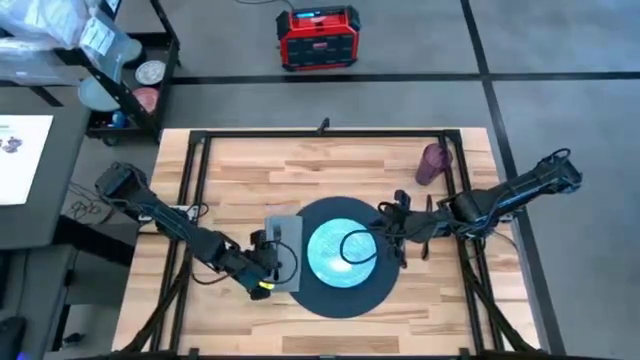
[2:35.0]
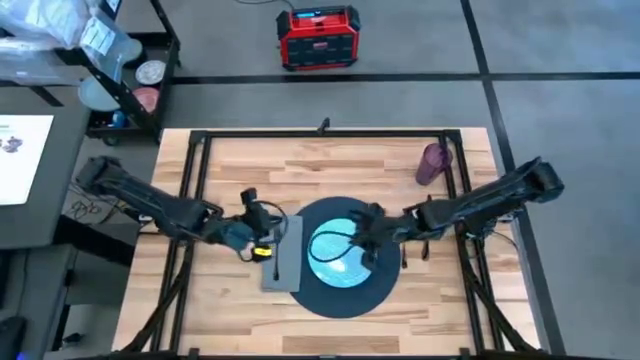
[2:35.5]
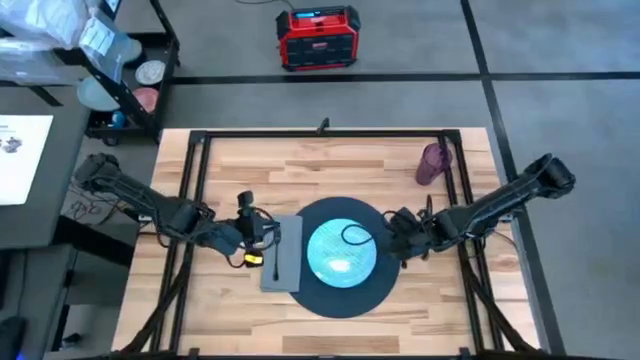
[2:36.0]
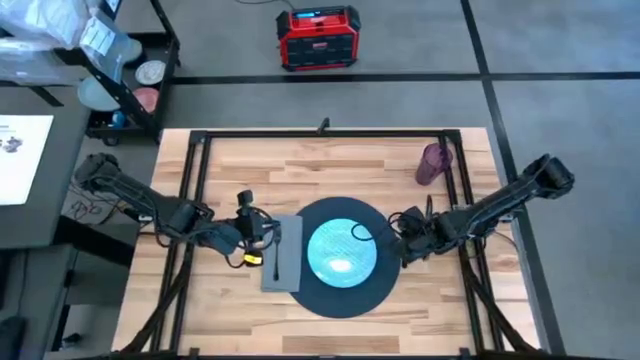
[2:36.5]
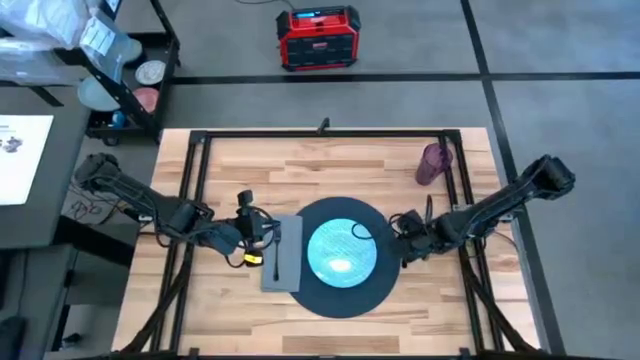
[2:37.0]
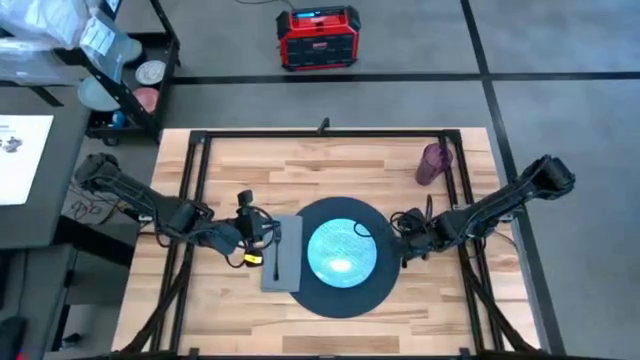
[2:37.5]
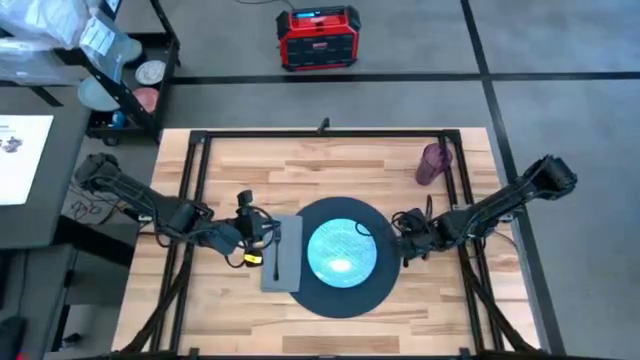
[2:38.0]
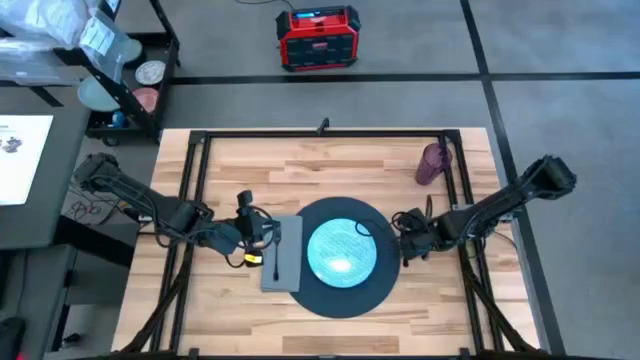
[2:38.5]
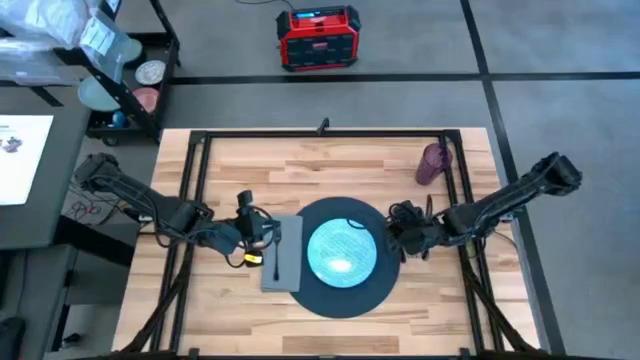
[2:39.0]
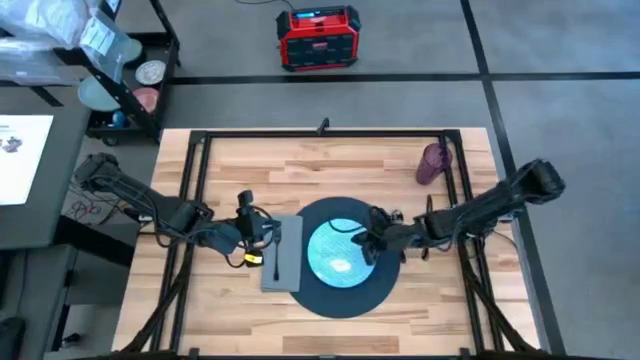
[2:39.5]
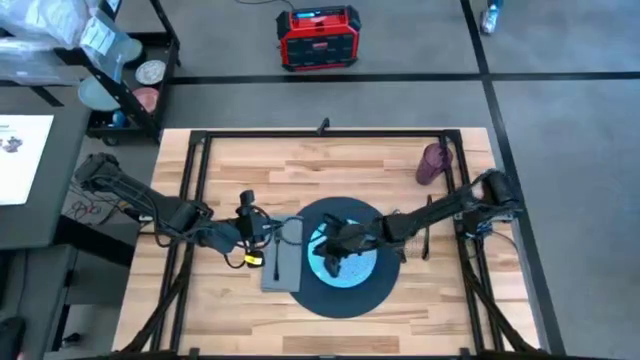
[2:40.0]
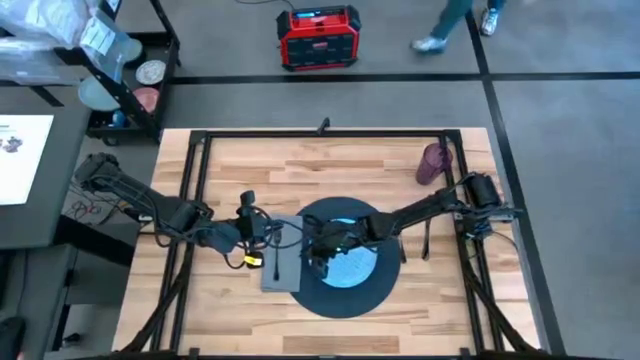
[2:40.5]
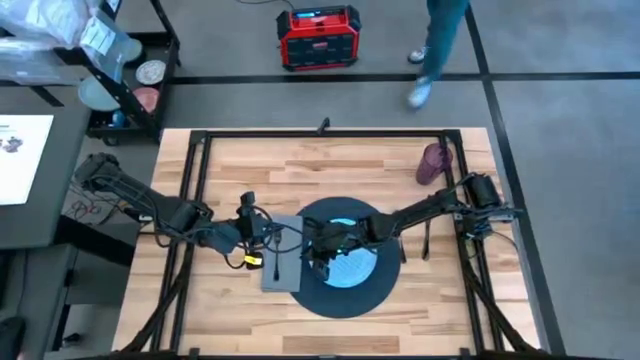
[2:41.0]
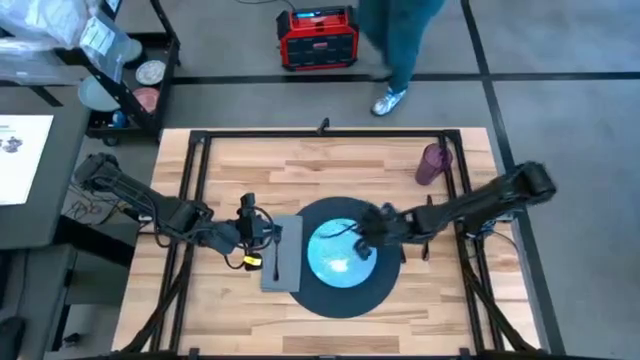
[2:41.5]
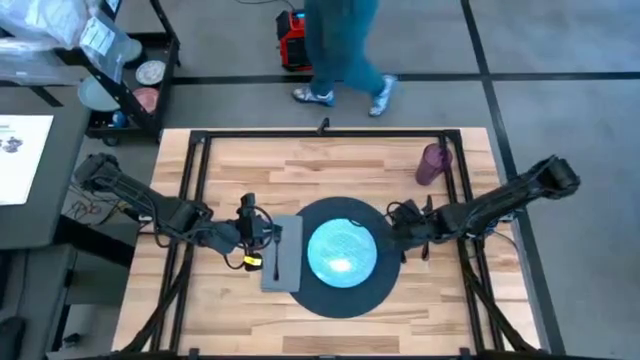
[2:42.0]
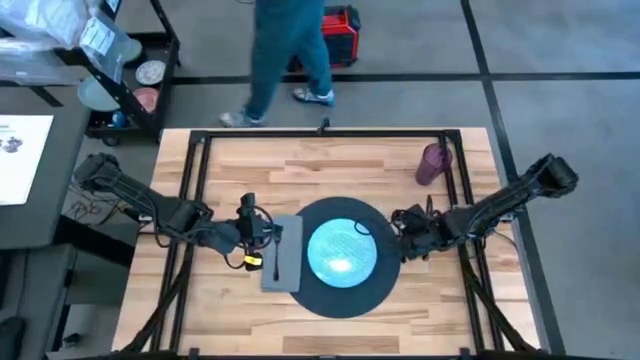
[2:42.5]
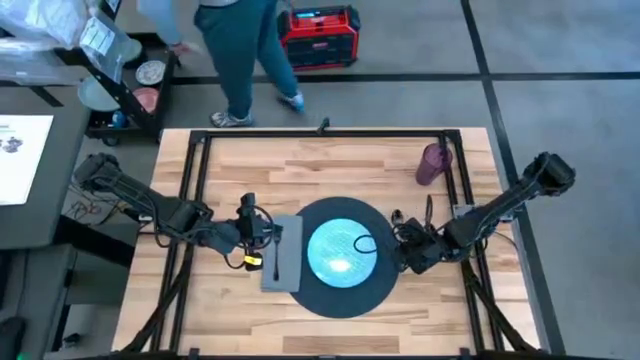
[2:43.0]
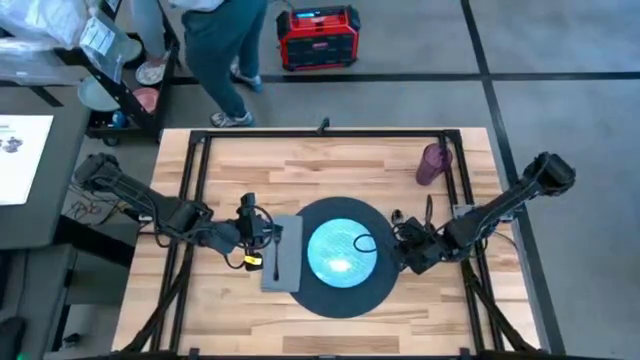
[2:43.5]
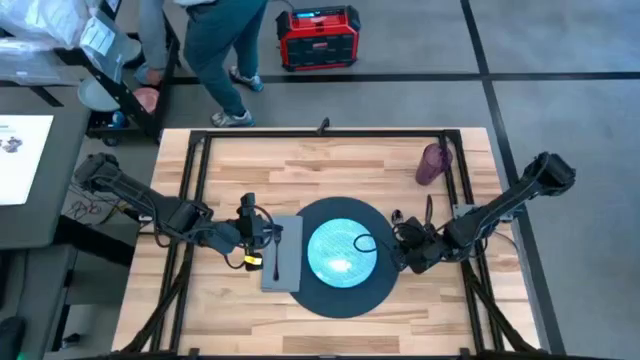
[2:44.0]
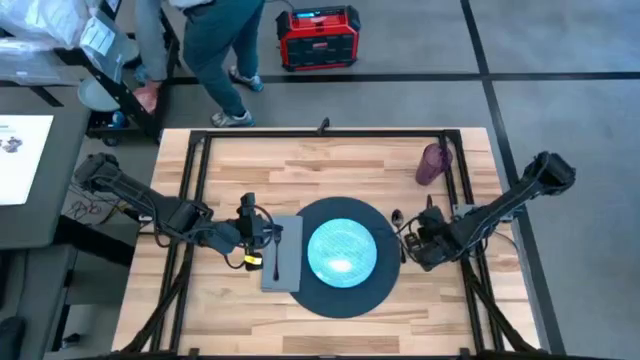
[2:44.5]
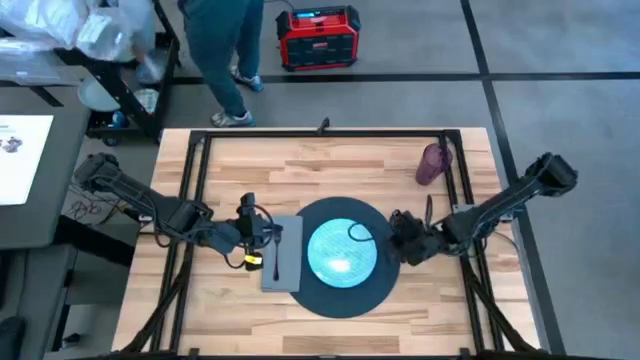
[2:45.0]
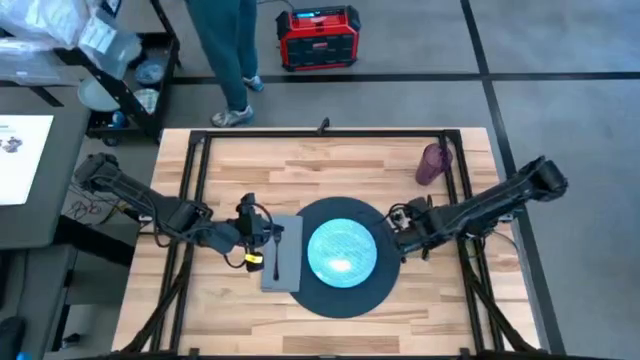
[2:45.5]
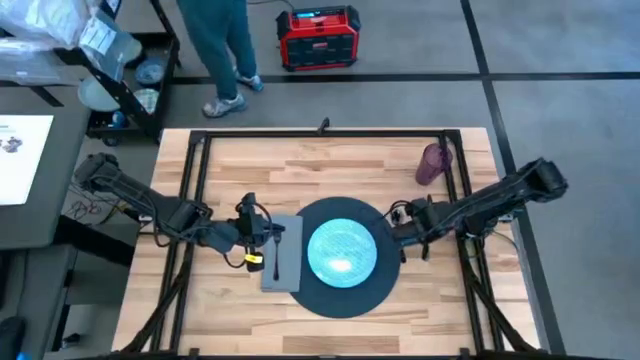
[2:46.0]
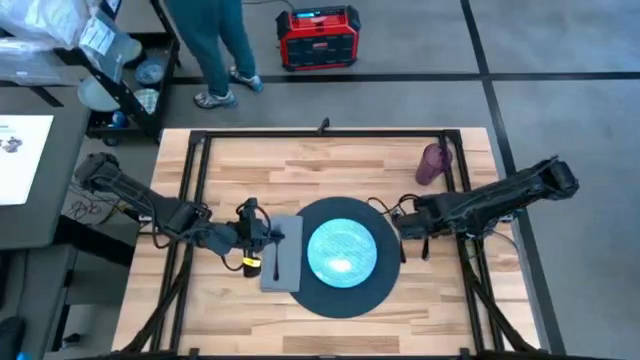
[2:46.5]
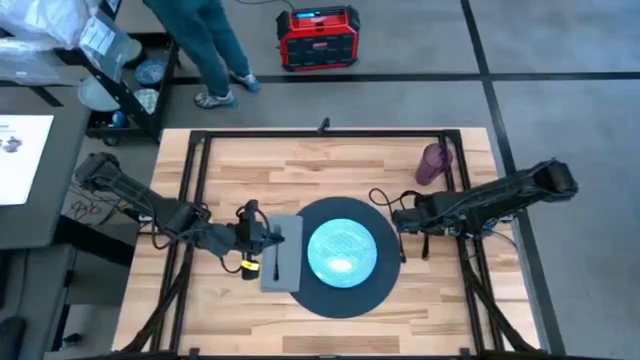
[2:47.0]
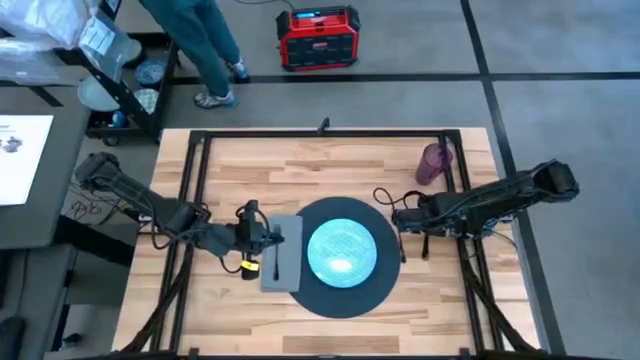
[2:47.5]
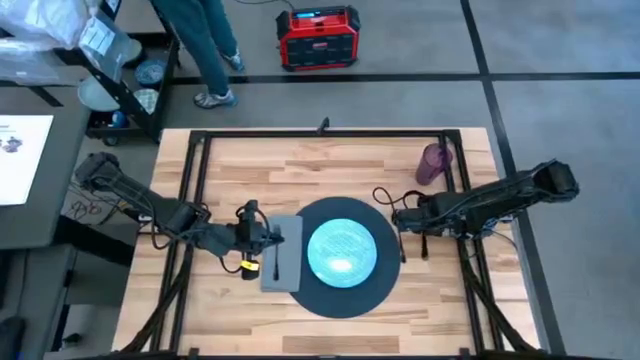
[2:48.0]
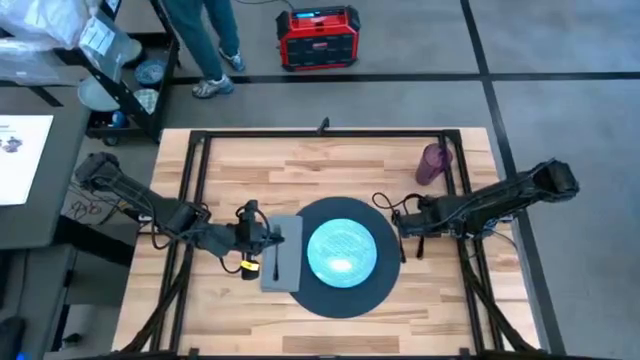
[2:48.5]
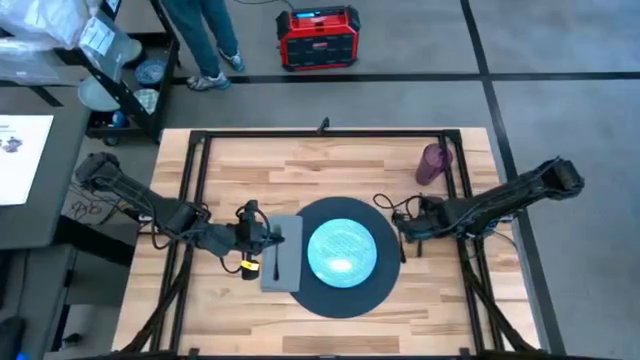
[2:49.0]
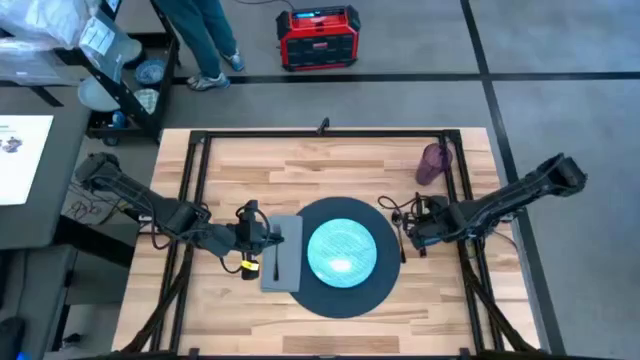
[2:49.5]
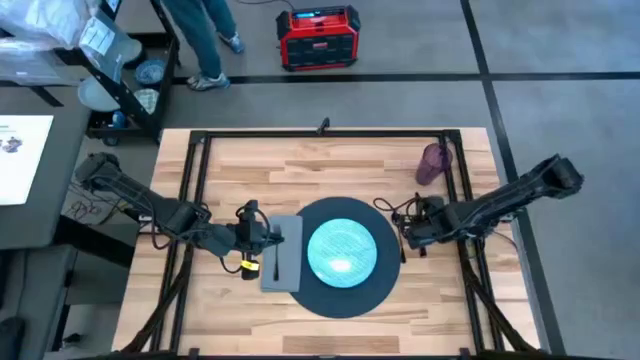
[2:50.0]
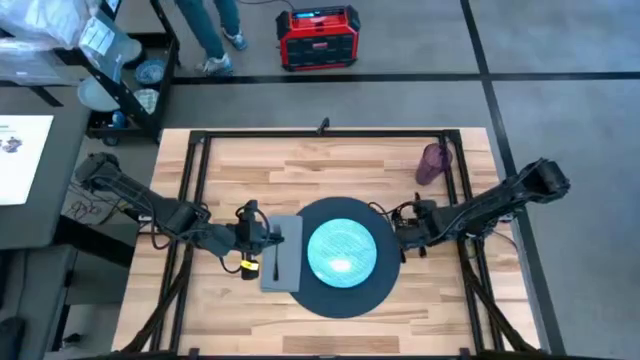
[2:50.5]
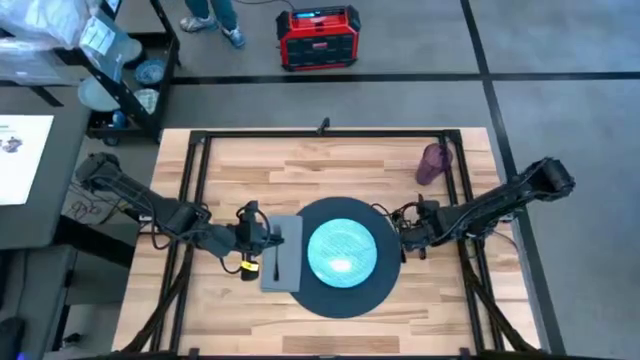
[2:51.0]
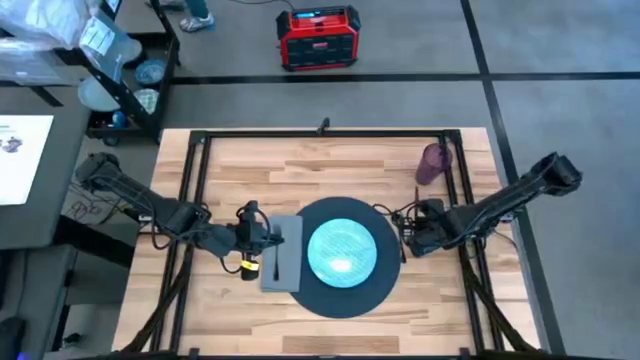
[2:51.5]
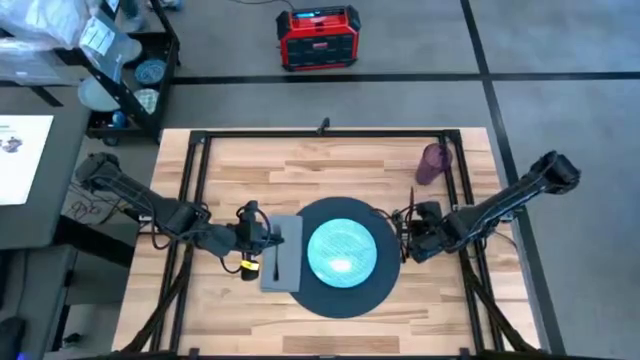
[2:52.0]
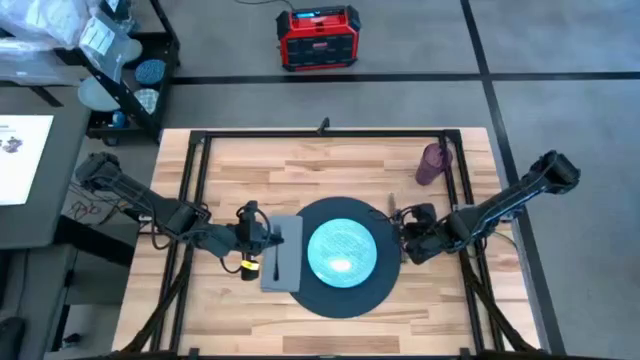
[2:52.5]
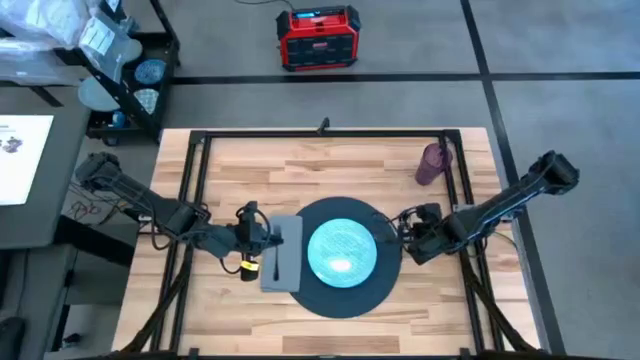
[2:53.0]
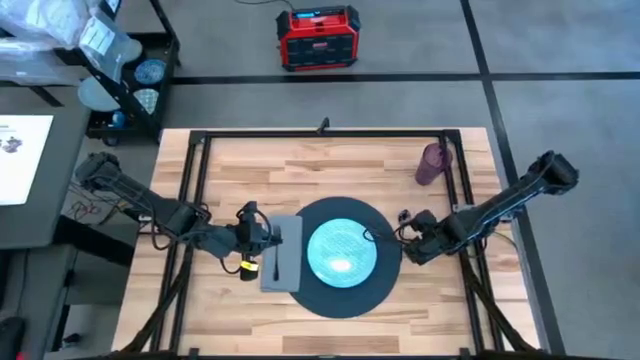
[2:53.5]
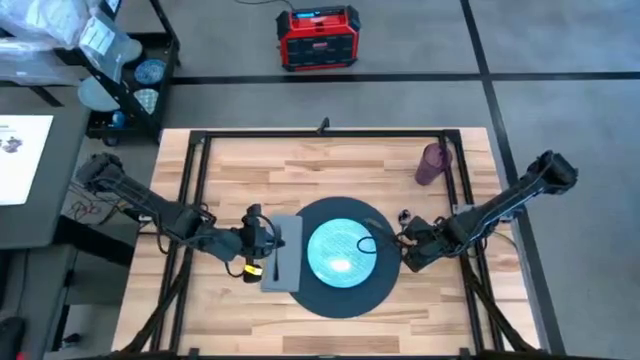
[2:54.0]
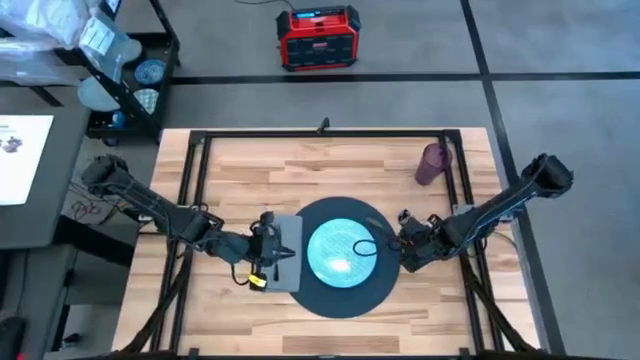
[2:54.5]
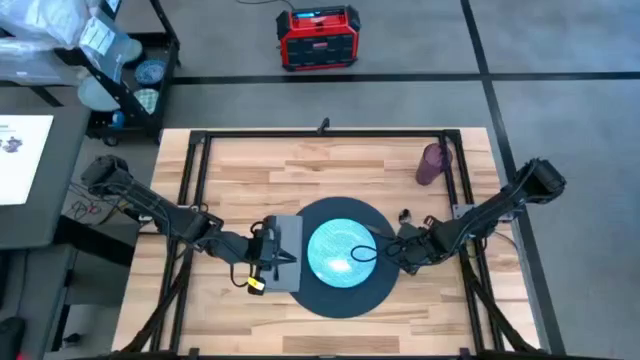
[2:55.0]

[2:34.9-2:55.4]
Task: Set table place
Put the black table knife on the tablemat to the right side of the blue plate
